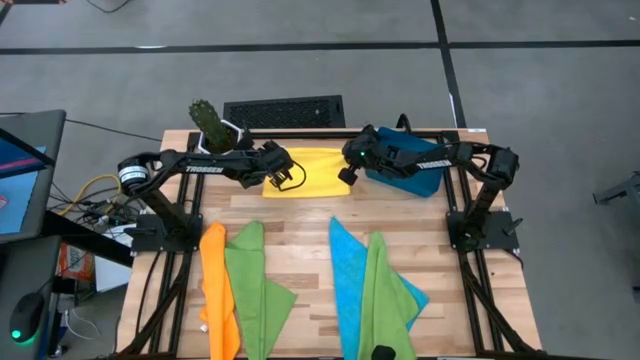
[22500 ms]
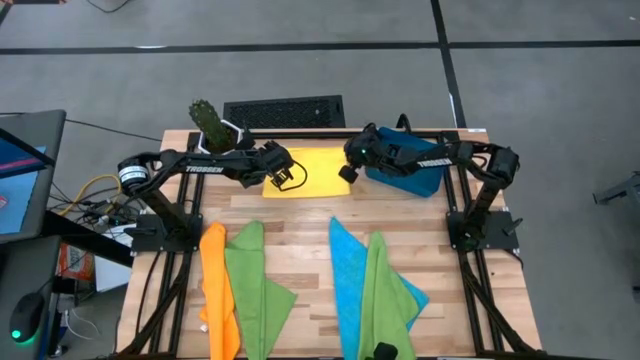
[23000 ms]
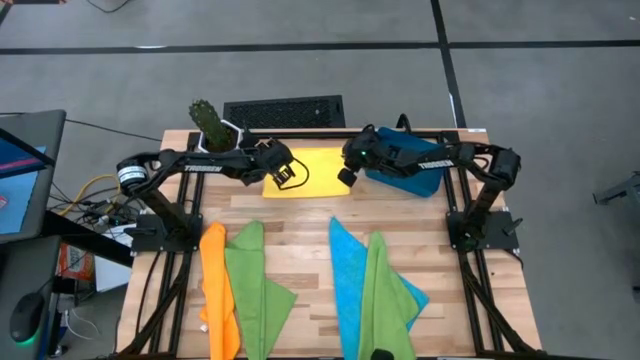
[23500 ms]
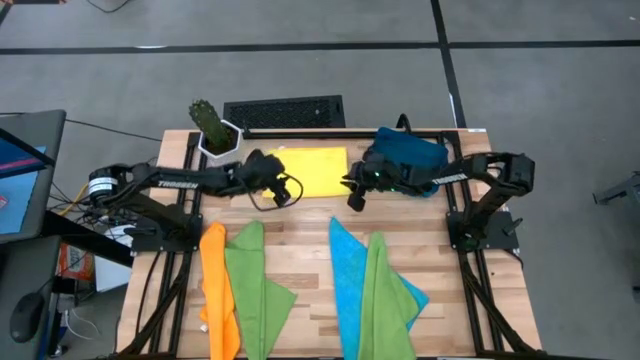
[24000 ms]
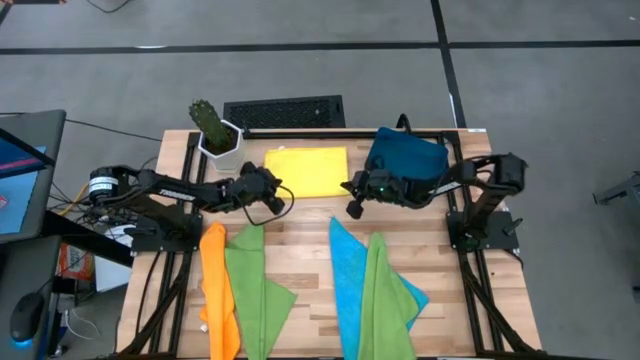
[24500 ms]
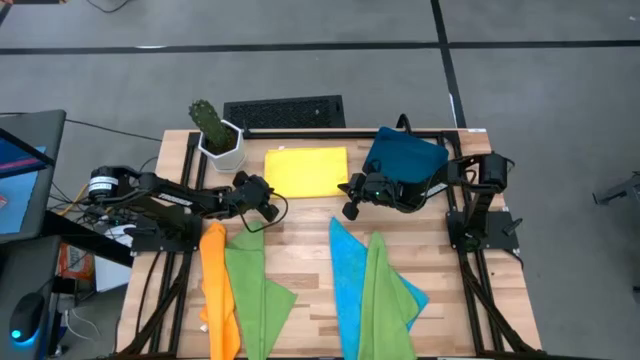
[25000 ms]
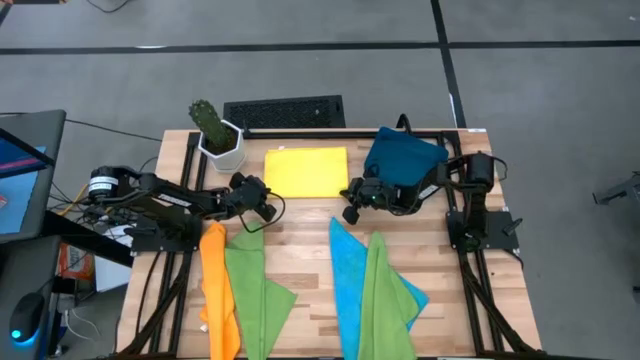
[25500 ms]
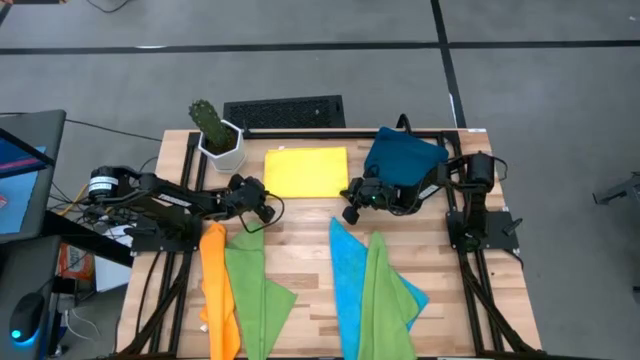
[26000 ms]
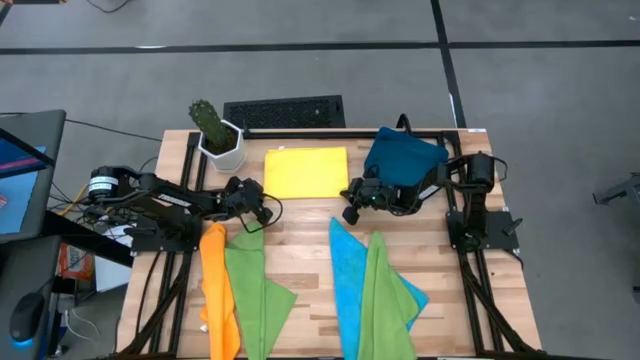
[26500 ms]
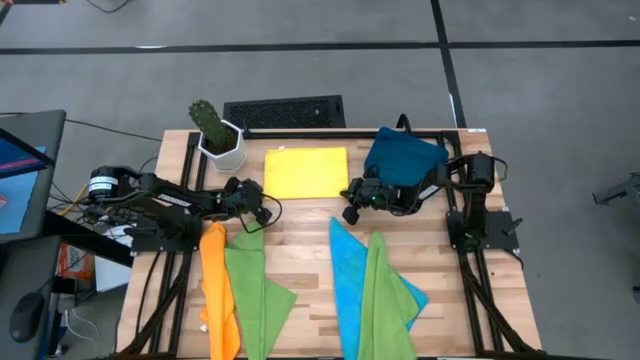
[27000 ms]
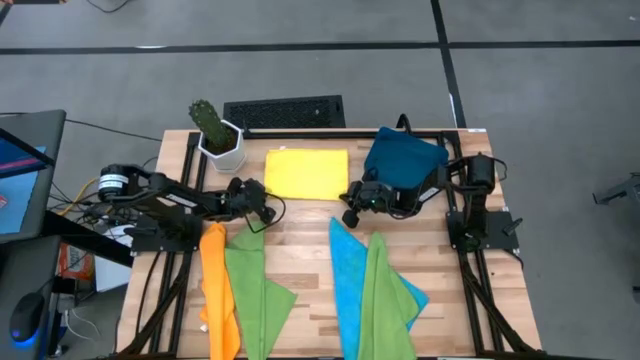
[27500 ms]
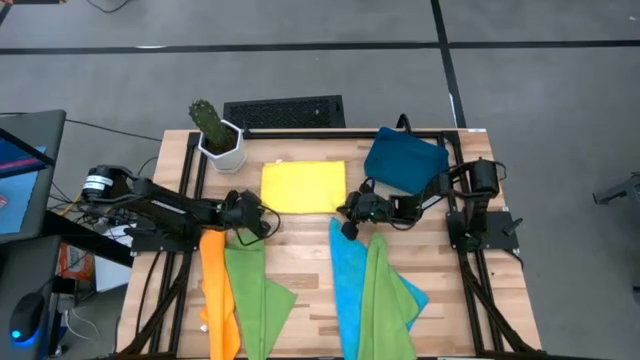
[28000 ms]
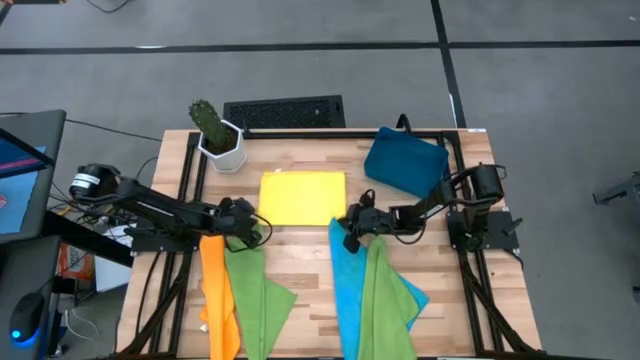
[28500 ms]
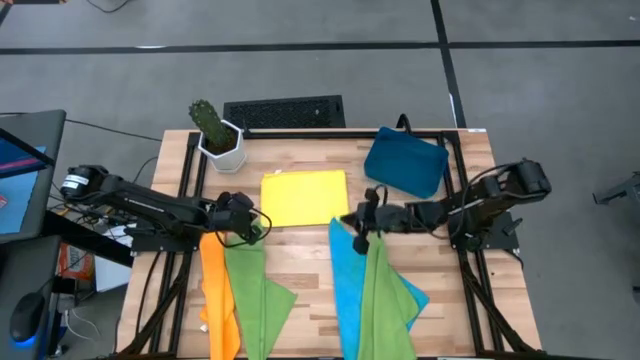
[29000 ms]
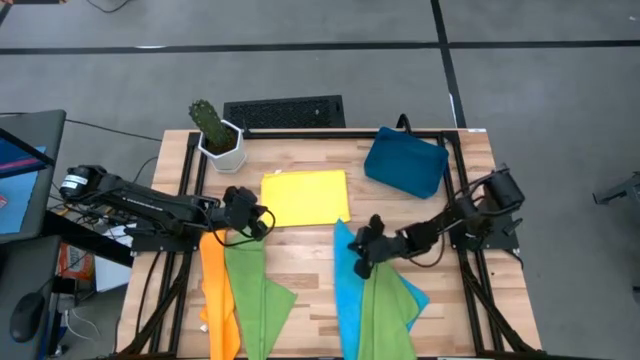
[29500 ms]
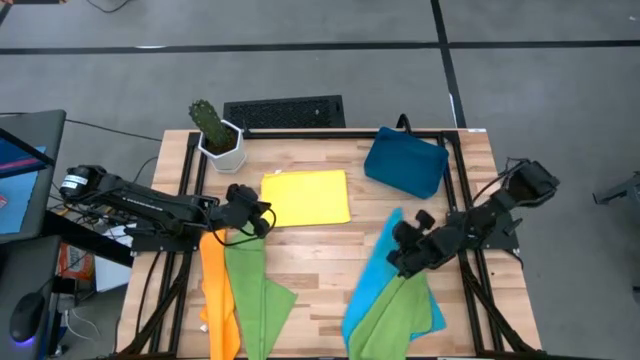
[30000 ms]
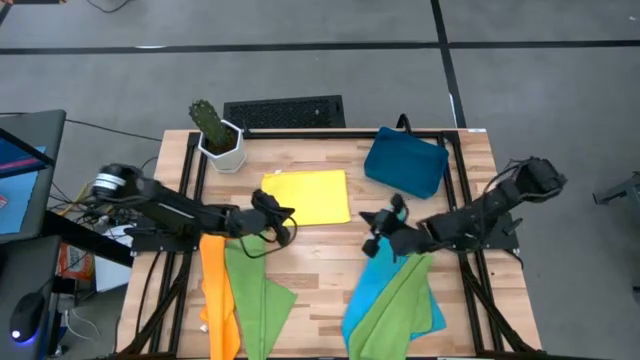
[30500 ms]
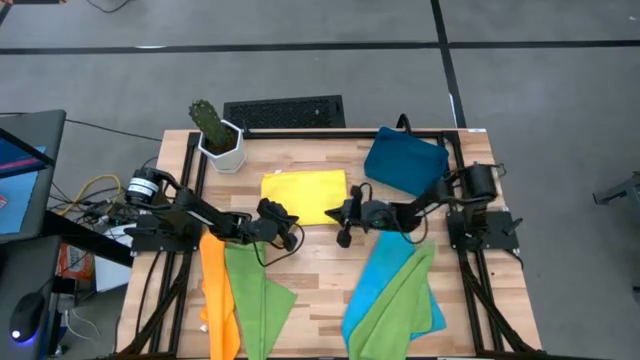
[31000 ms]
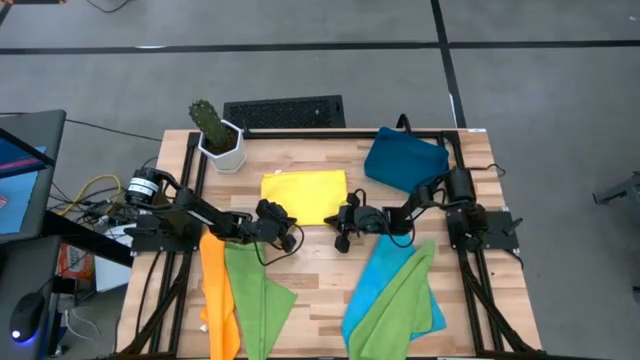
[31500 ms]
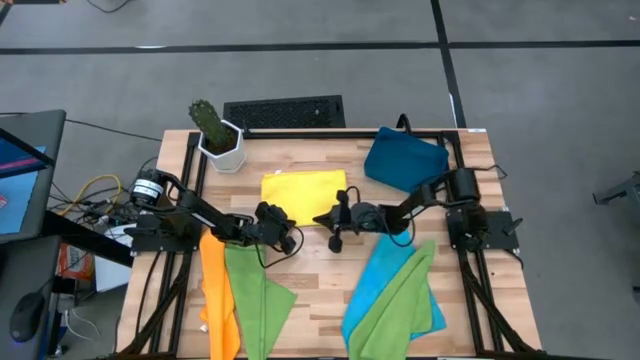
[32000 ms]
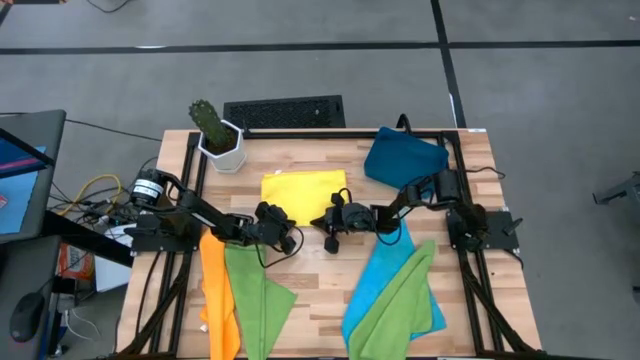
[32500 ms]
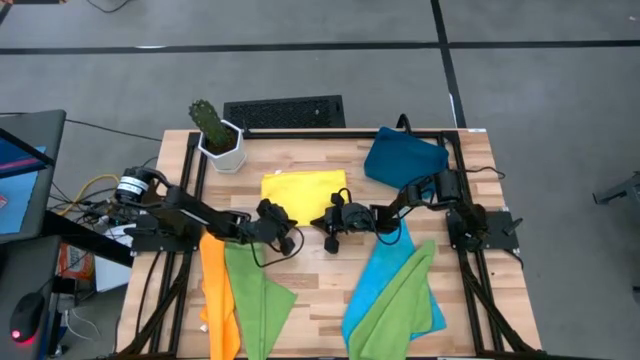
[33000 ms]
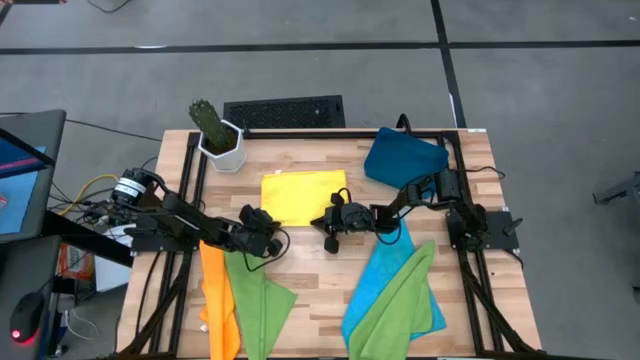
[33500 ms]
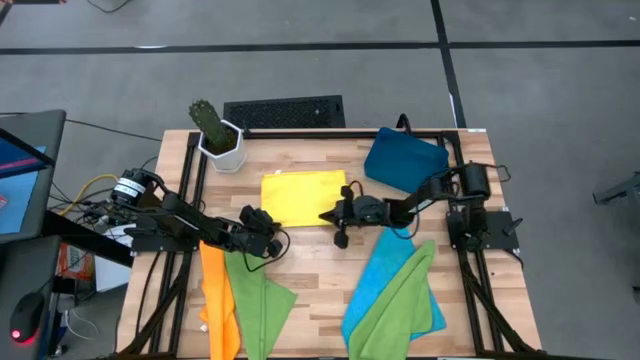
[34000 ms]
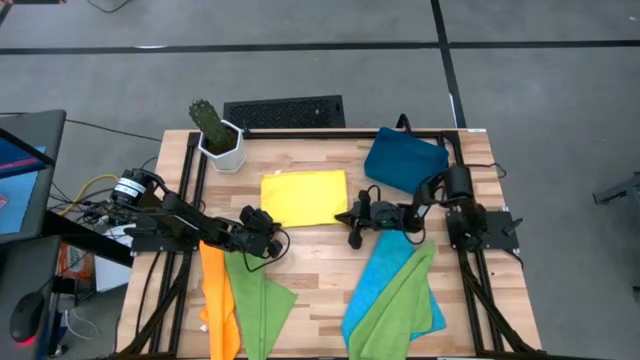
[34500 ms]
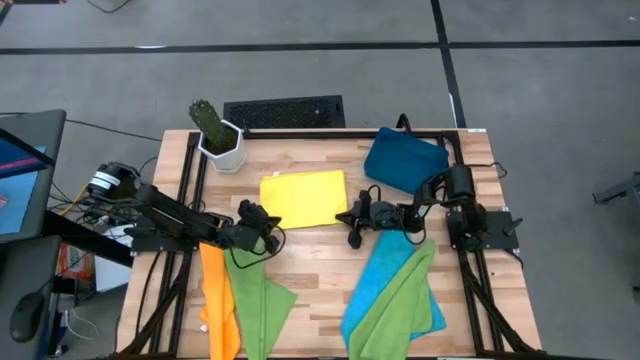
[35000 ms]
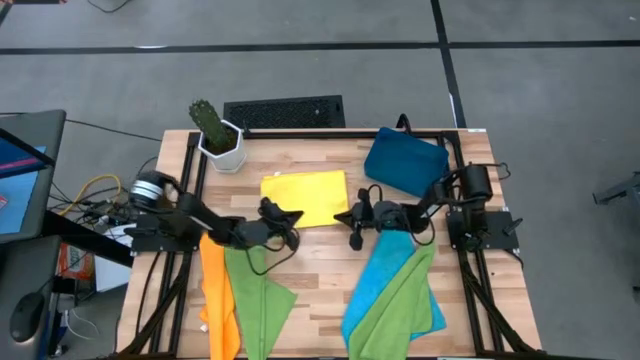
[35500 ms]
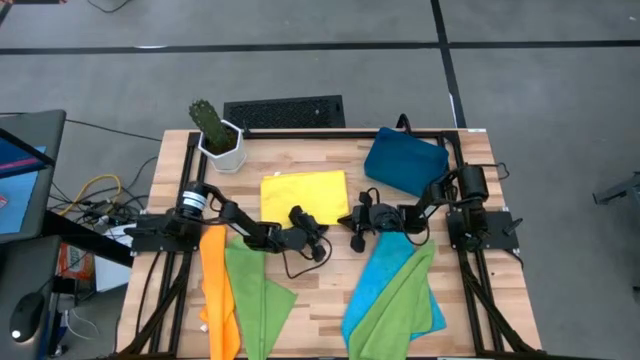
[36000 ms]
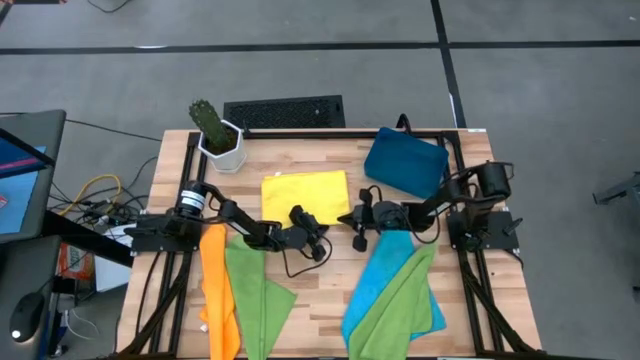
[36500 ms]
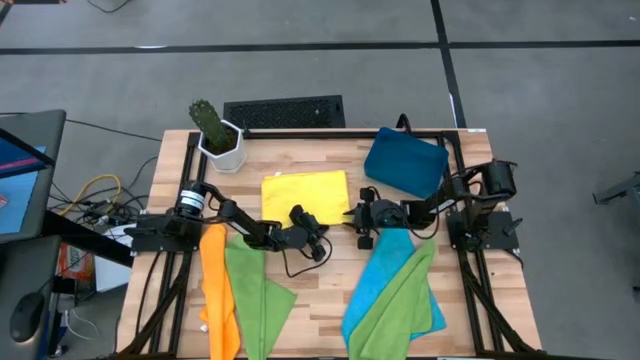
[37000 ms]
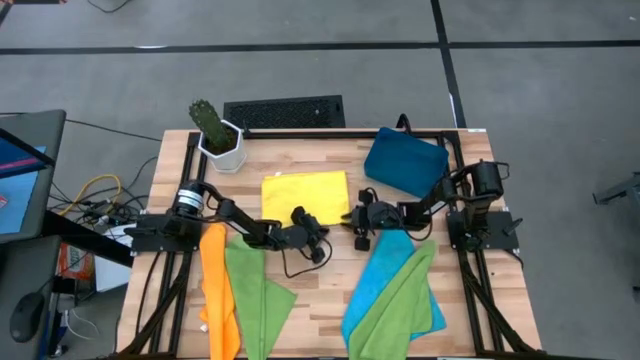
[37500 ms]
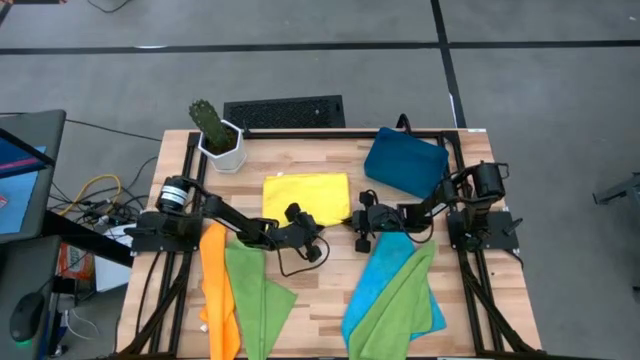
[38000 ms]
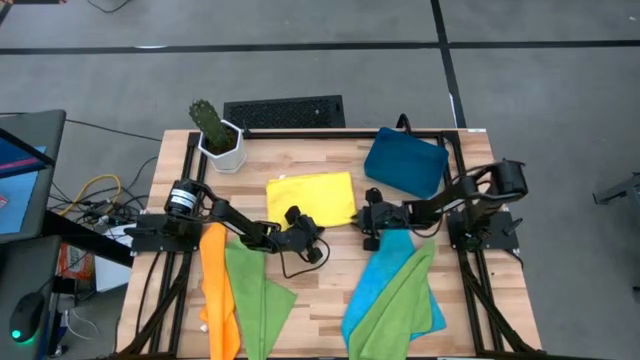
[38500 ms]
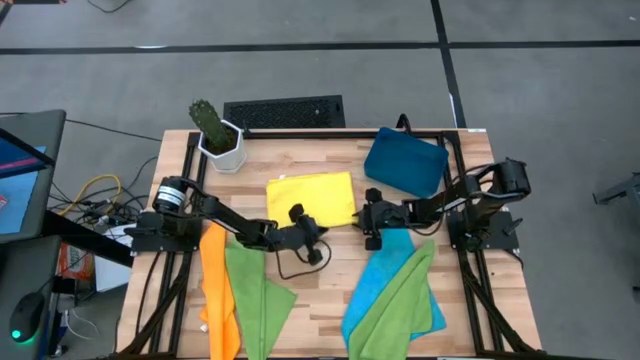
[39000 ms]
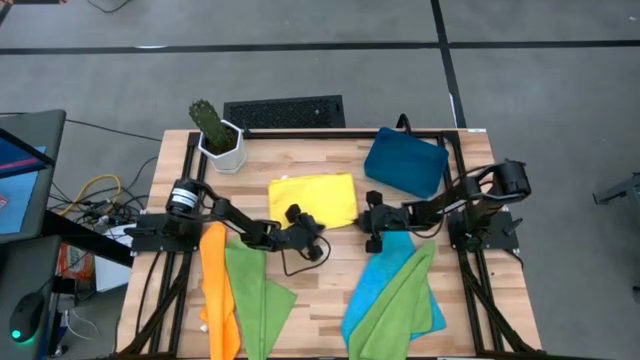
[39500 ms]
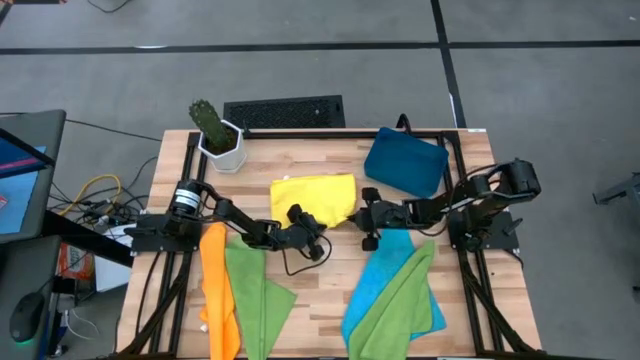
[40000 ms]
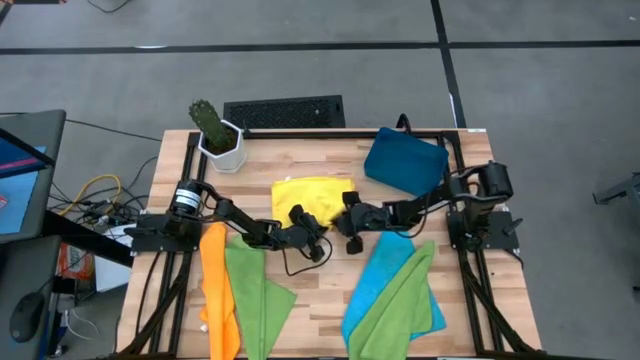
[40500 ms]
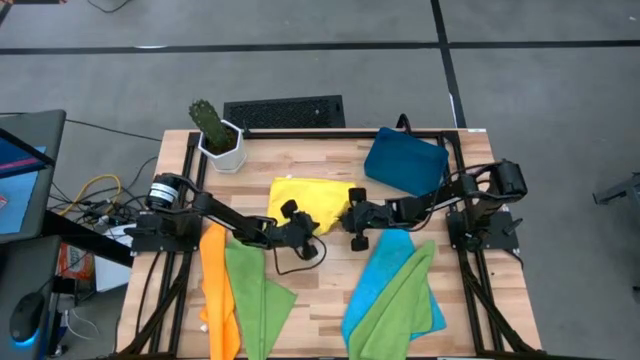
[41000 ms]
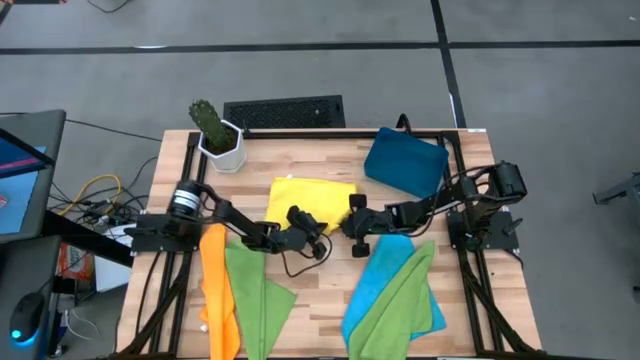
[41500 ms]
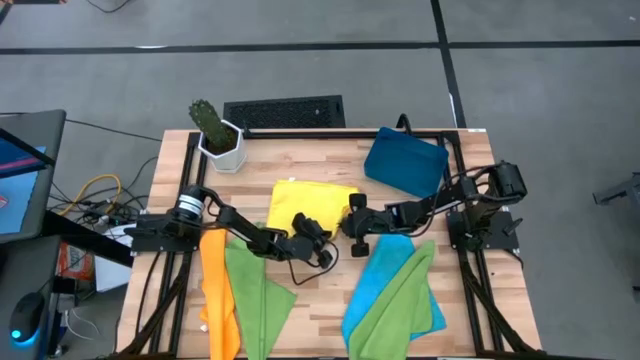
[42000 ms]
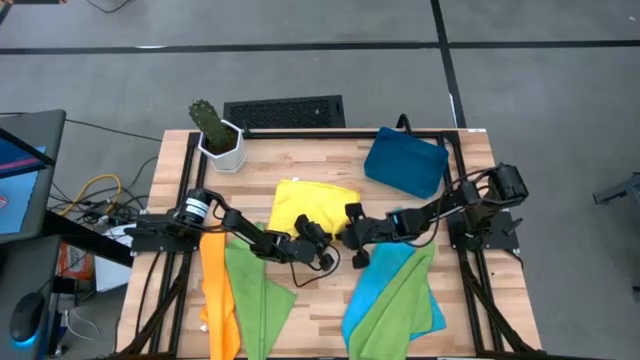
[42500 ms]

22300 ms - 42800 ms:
Task: Fold microfiber towels
Fold the yellow microfiber cloth
